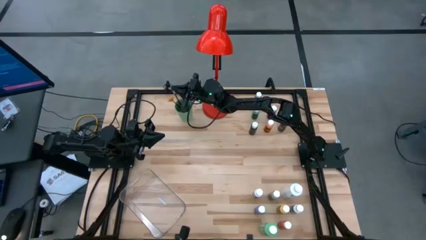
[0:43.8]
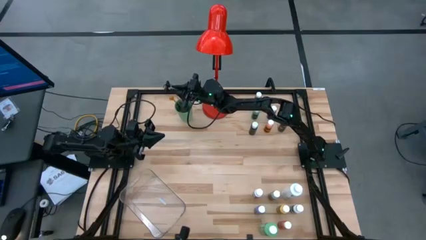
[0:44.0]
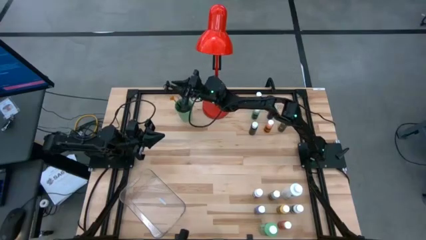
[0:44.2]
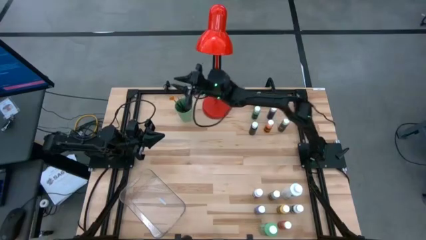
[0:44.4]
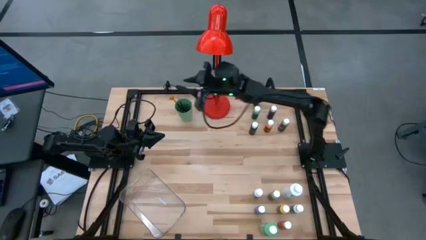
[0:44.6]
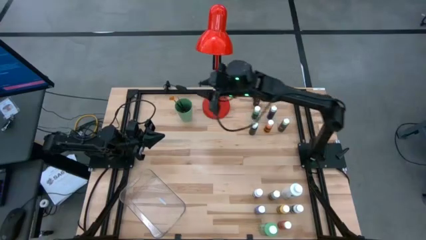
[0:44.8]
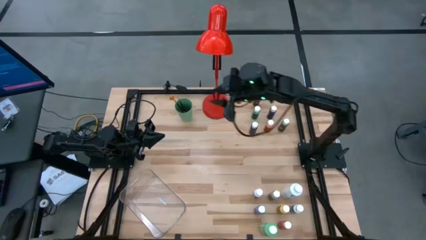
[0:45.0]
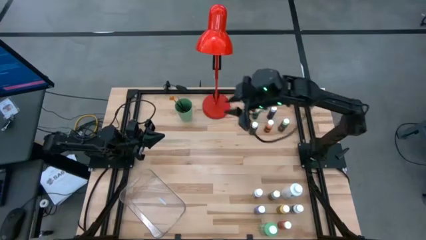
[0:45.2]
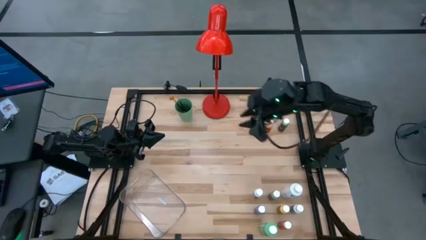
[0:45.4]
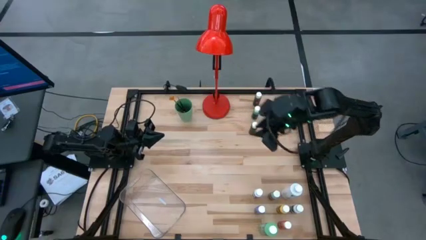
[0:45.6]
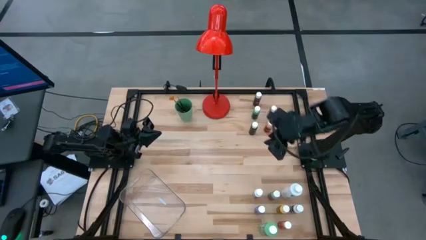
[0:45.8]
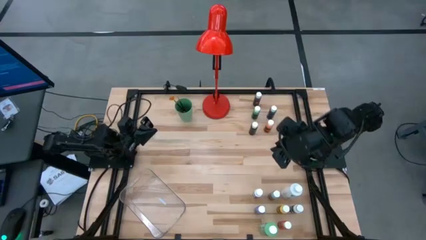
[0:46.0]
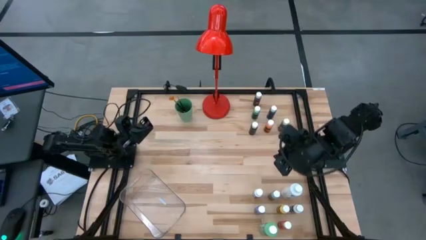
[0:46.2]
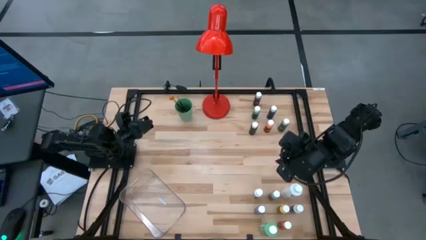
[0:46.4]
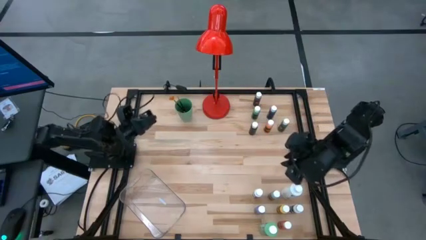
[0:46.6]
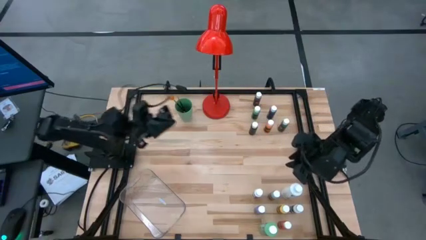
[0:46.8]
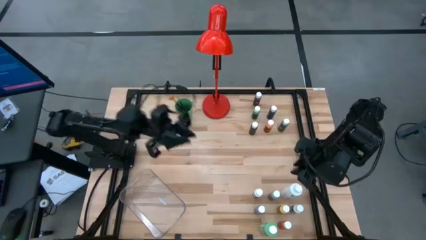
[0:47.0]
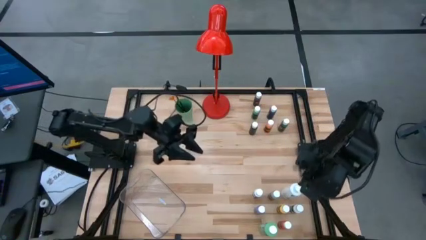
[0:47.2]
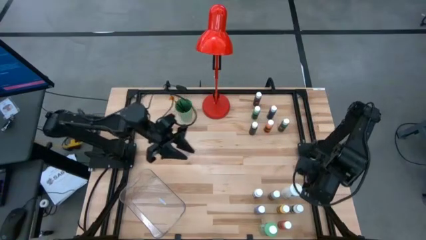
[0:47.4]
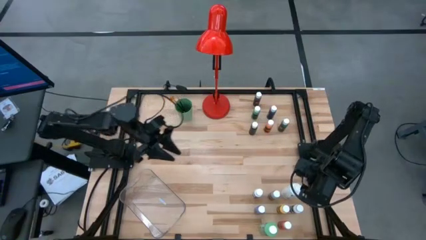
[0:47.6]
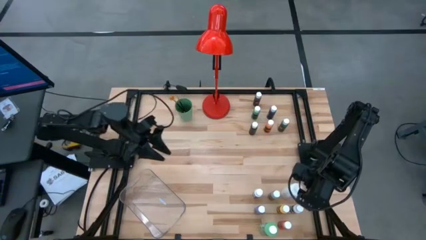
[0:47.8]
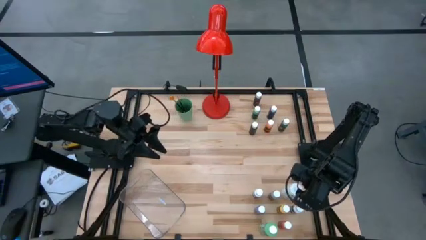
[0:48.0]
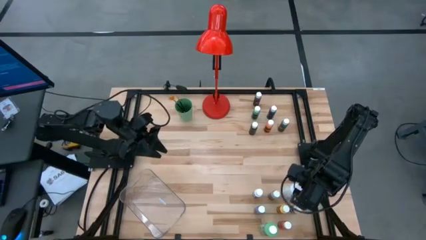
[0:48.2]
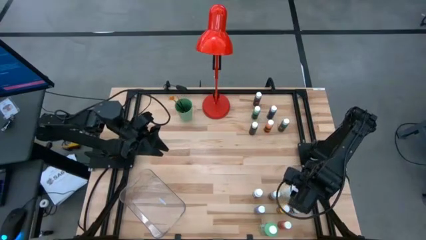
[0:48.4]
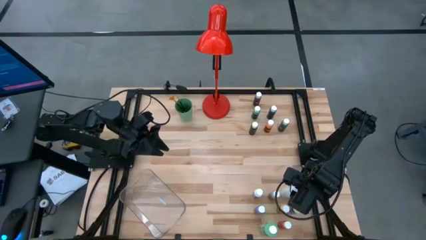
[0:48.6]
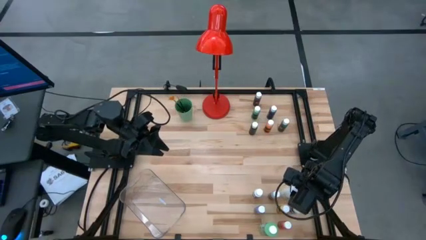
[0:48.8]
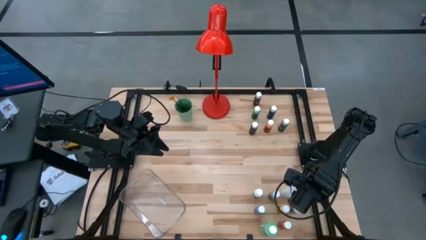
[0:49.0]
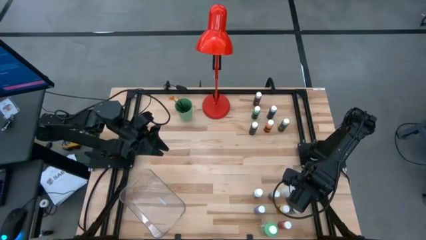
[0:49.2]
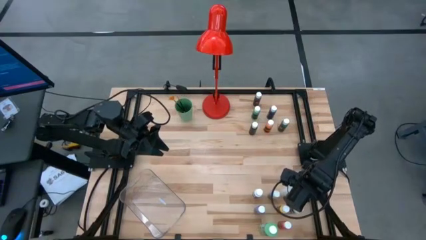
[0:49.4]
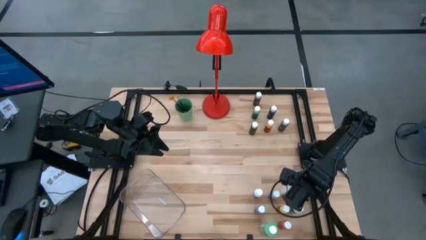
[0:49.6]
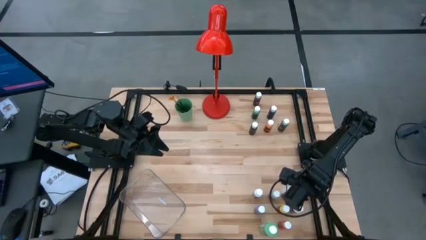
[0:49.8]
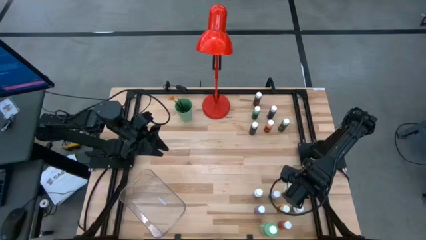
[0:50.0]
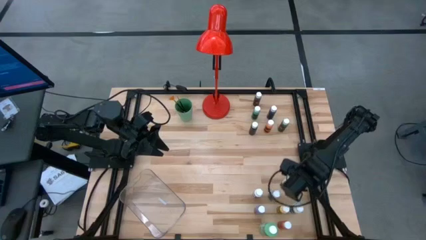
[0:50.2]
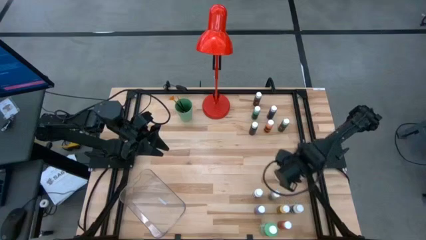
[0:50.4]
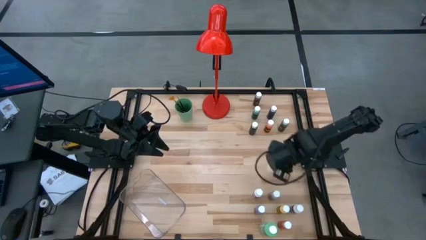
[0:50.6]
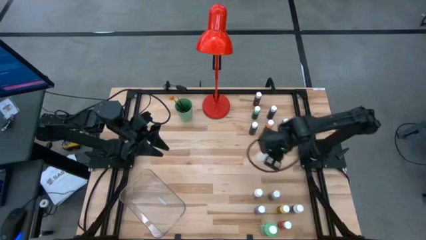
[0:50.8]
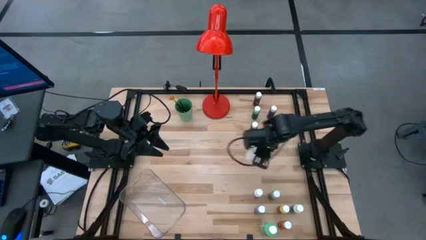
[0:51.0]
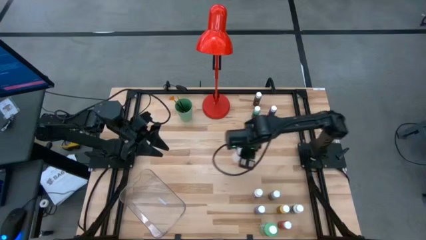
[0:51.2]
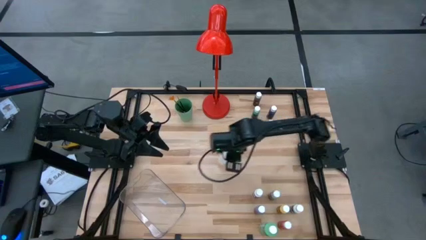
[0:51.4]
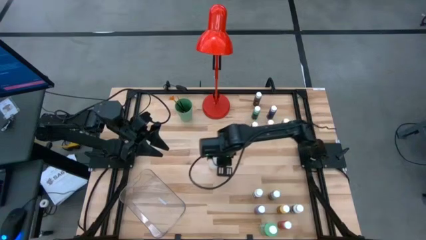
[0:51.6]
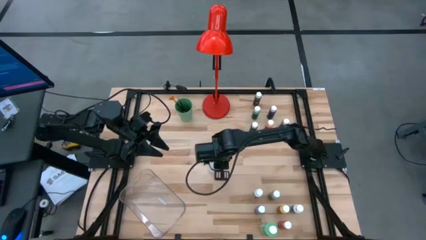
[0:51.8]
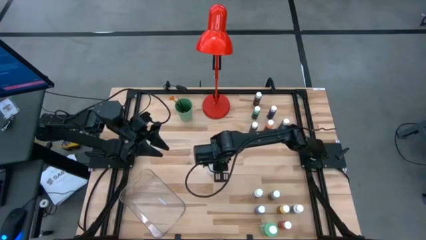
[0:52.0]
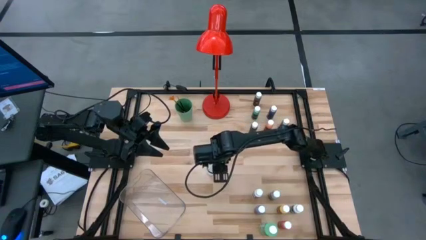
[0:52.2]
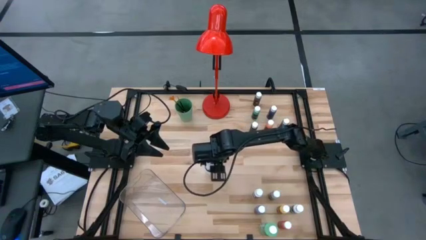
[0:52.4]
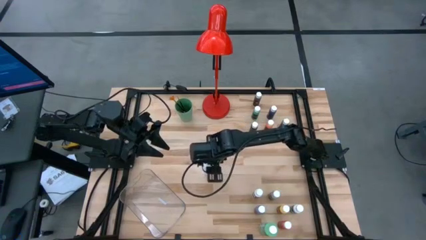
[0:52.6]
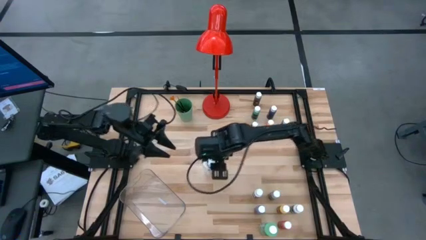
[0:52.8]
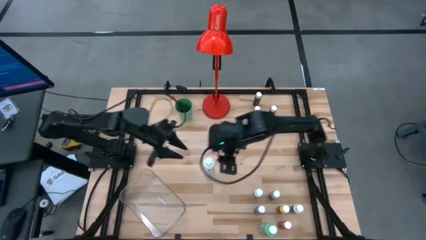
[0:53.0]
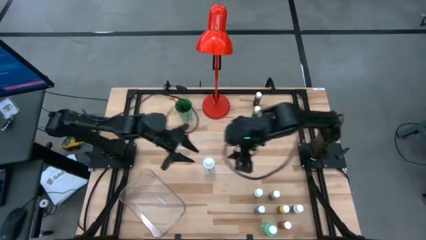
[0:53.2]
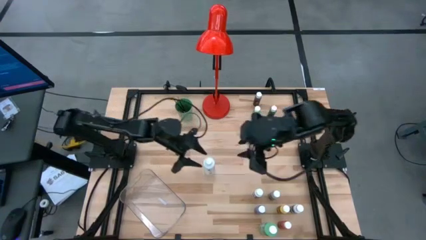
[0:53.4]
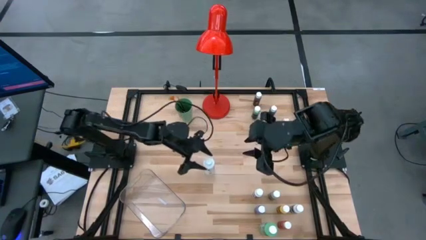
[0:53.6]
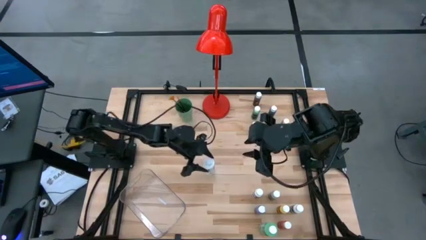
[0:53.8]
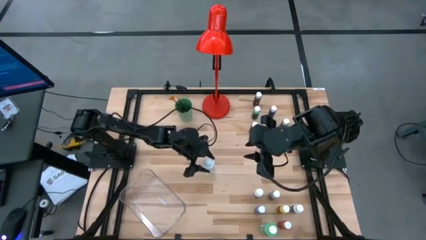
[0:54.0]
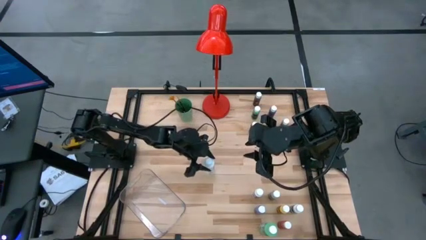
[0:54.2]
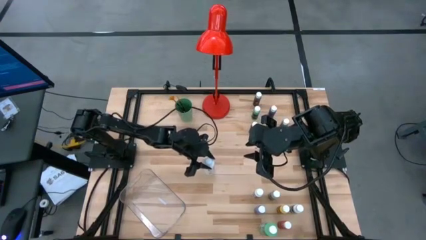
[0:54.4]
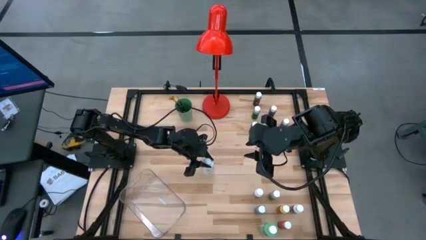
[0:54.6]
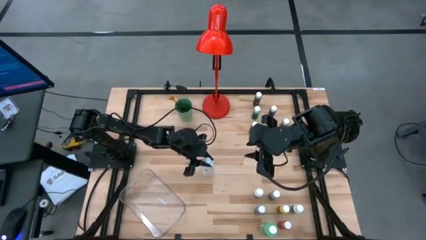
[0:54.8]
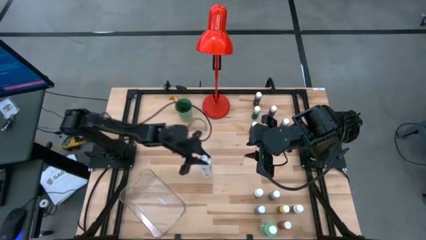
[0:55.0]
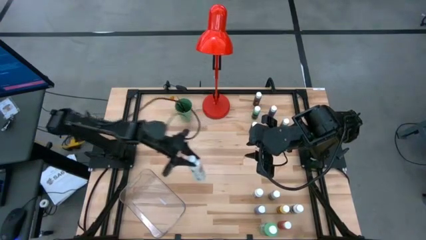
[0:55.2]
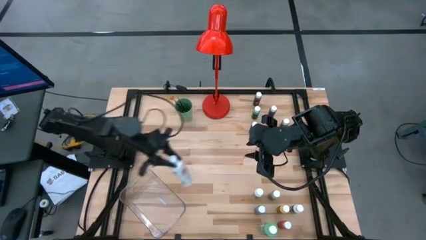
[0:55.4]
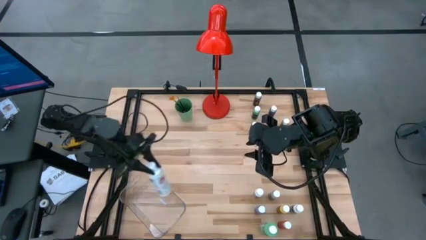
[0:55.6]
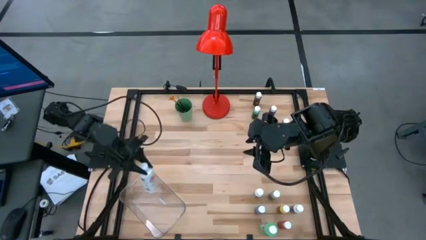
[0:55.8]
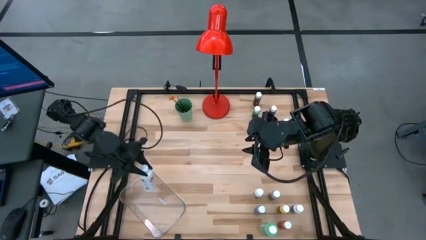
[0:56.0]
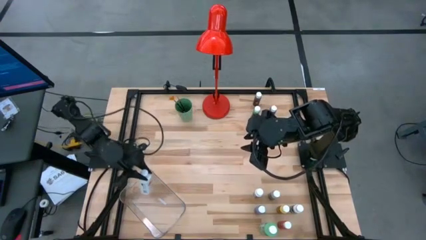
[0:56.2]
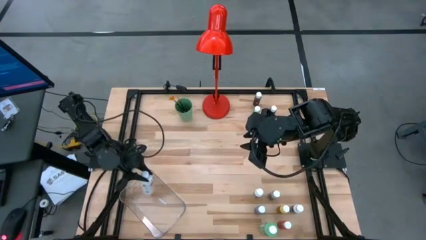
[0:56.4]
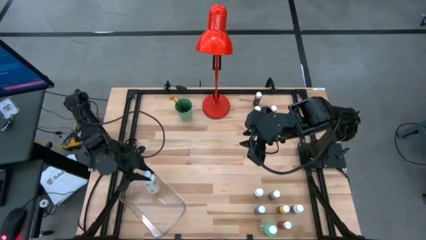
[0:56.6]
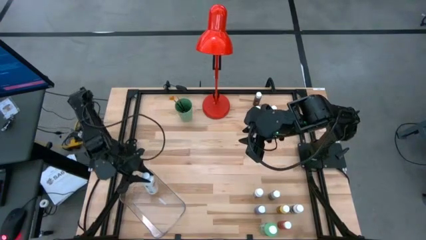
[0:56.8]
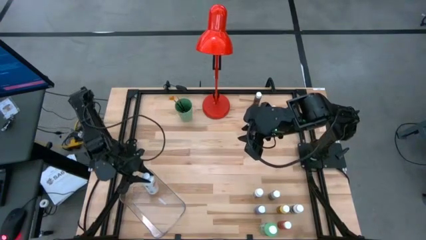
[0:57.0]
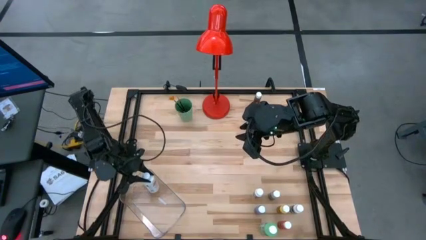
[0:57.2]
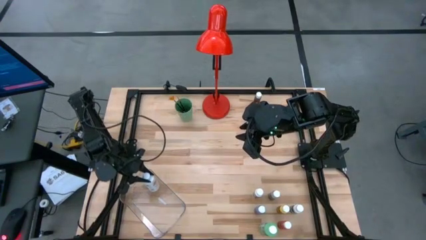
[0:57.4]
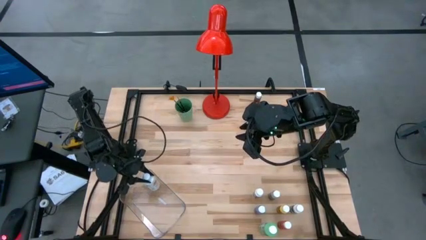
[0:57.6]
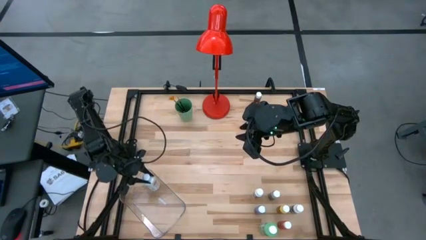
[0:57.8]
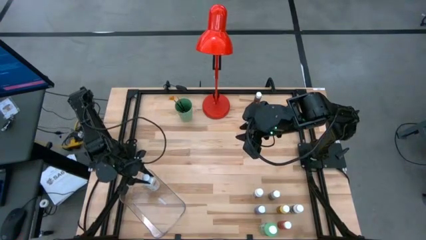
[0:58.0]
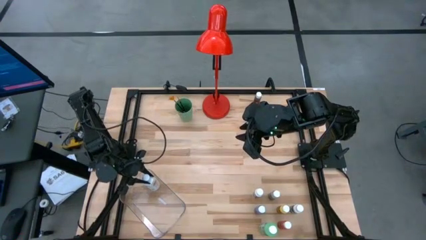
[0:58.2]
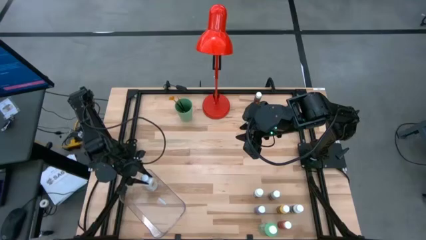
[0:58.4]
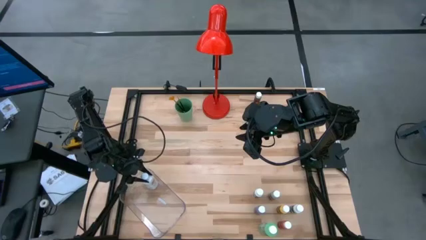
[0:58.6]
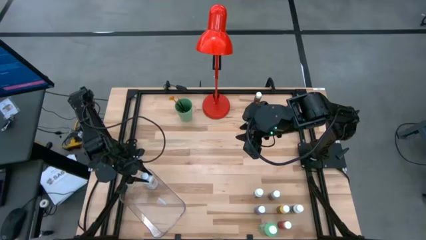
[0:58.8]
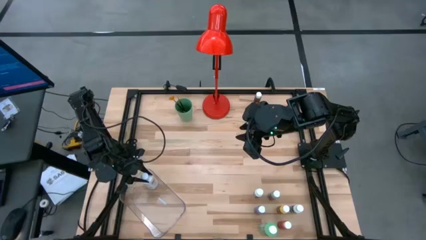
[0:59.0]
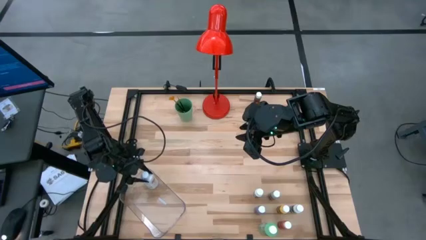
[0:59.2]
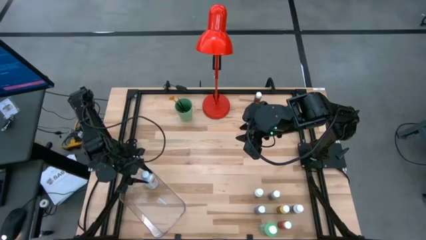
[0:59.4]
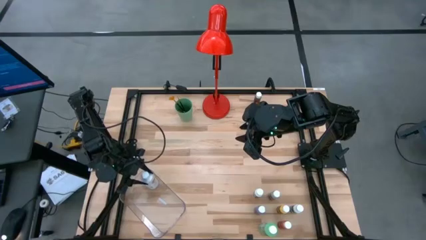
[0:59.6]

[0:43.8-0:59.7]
Task: Pick & Place Paint Supplies
Put the big white coloring bottle into the transparent bin

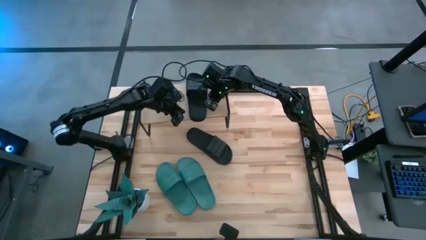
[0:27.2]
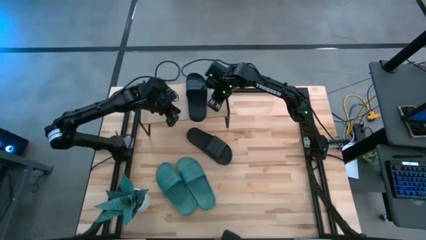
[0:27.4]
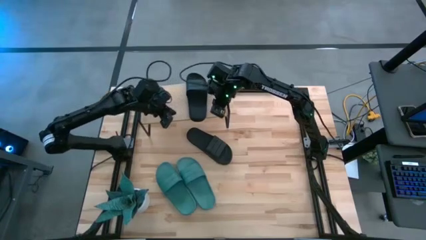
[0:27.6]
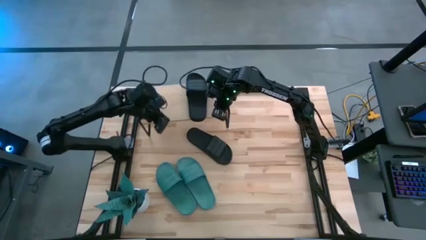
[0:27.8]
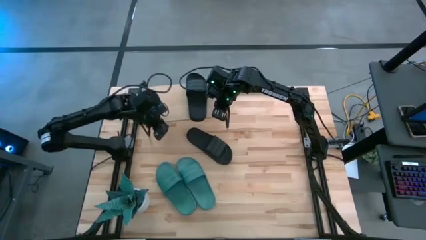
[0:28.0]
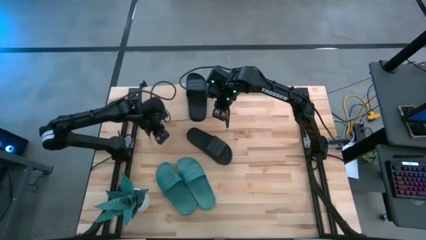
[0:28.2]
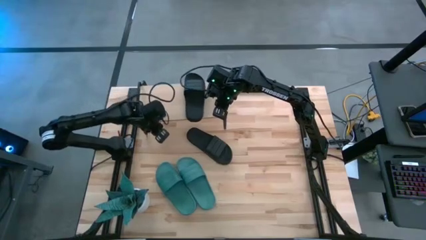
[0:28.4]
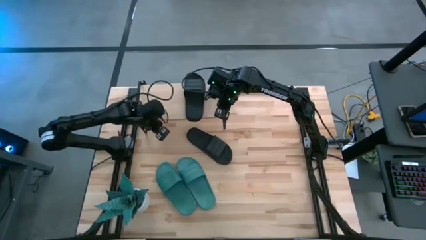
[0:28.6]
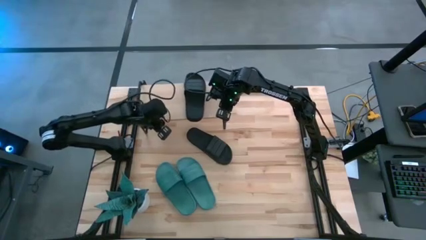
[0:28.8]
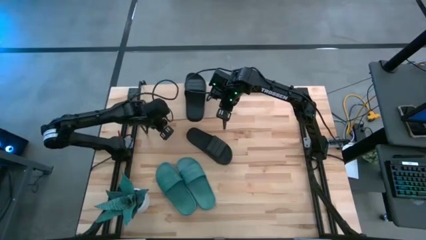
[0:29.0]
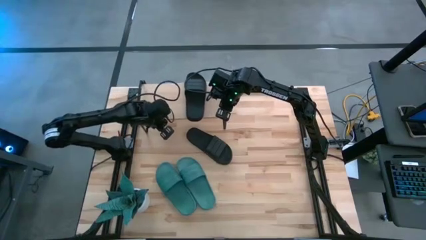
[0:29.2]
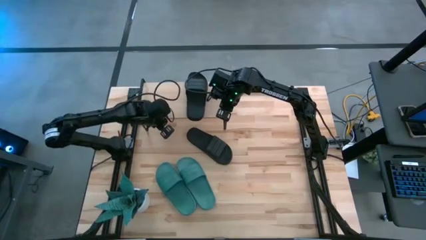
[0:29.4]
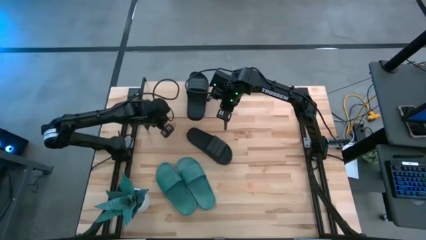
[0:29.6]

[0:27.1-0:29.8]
Task: Pick and place slides into the shelf
Adjust the shelf
